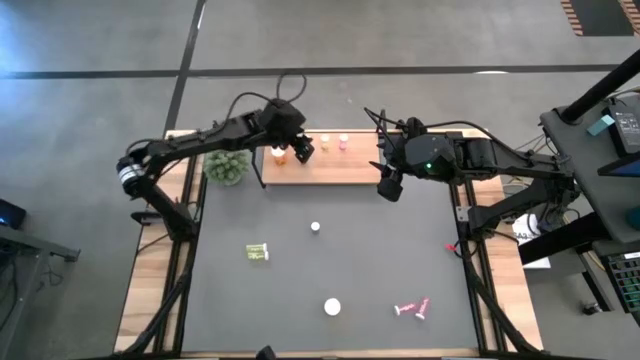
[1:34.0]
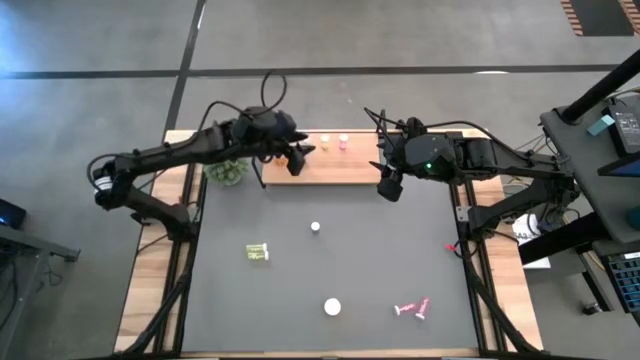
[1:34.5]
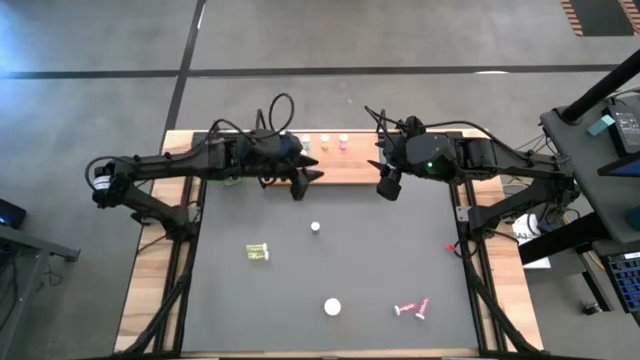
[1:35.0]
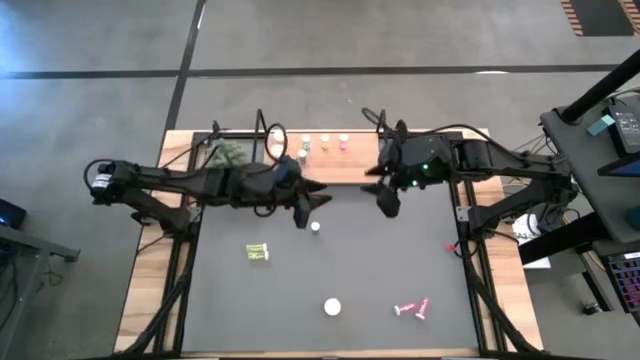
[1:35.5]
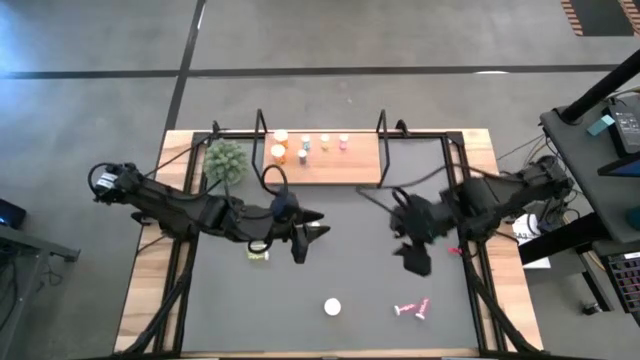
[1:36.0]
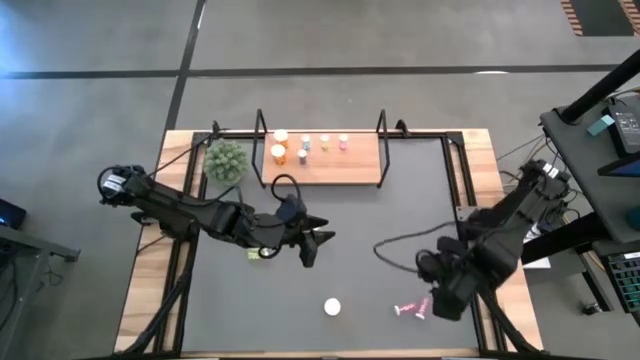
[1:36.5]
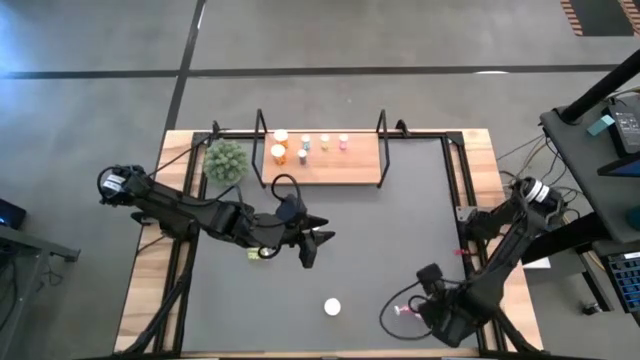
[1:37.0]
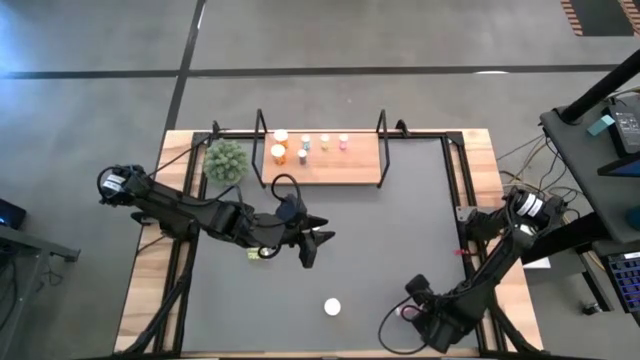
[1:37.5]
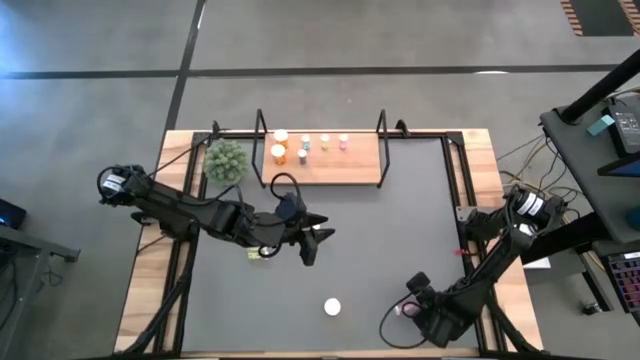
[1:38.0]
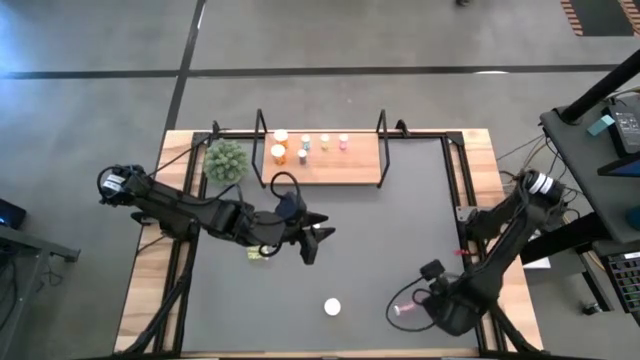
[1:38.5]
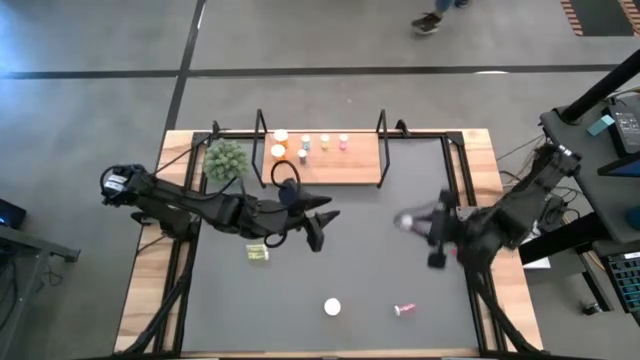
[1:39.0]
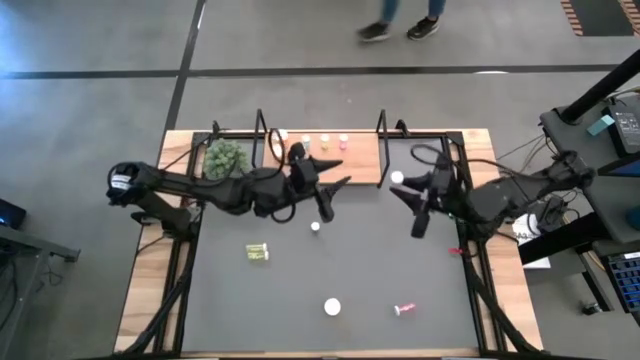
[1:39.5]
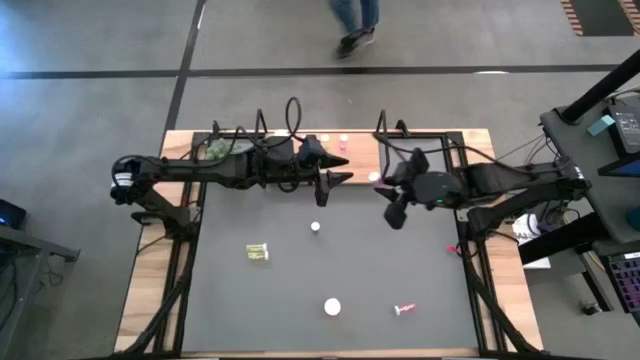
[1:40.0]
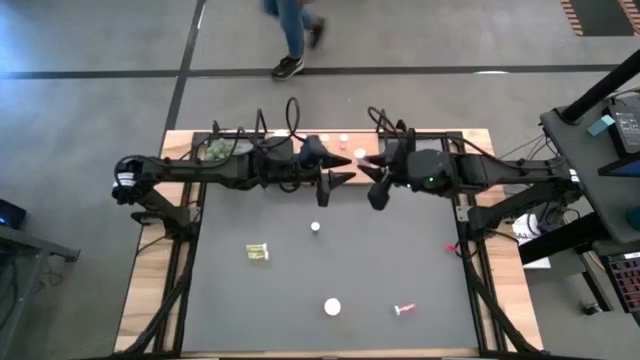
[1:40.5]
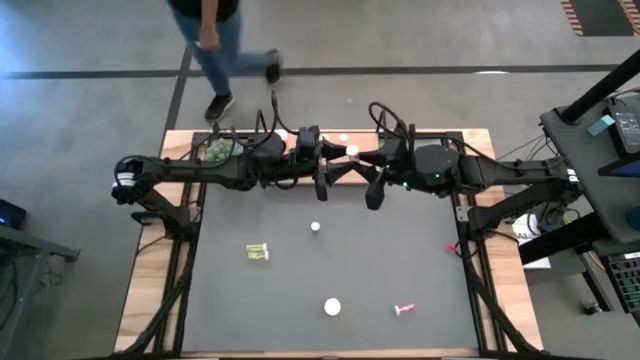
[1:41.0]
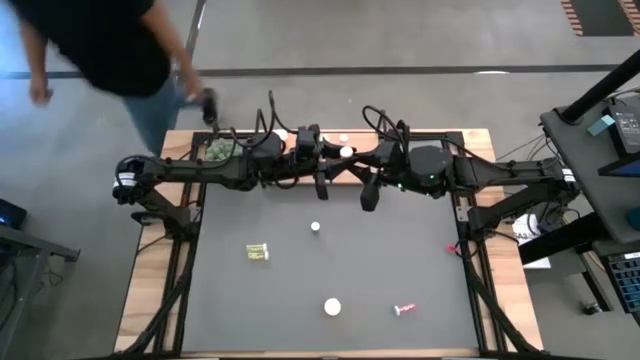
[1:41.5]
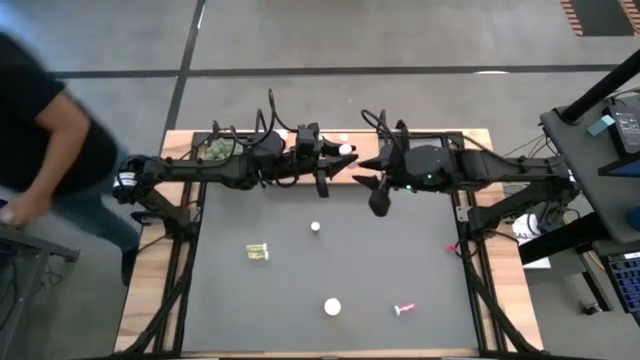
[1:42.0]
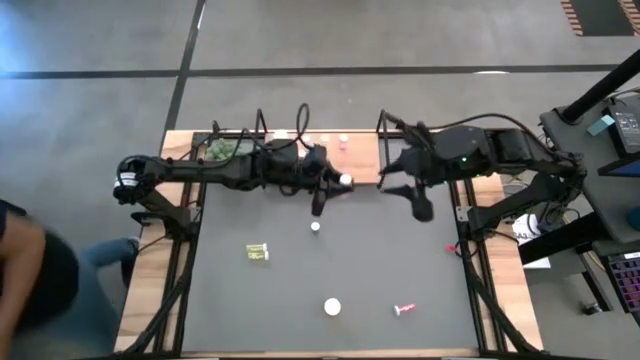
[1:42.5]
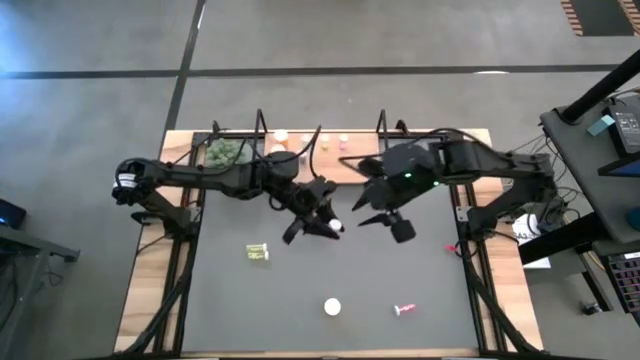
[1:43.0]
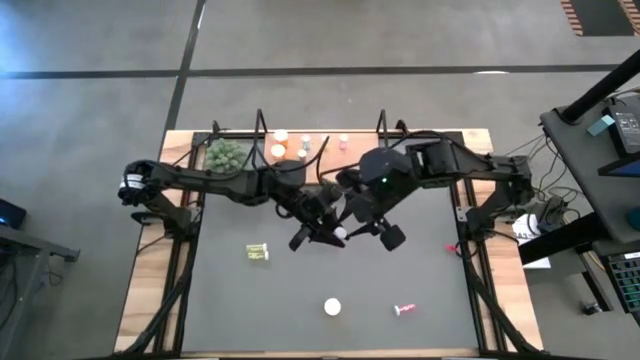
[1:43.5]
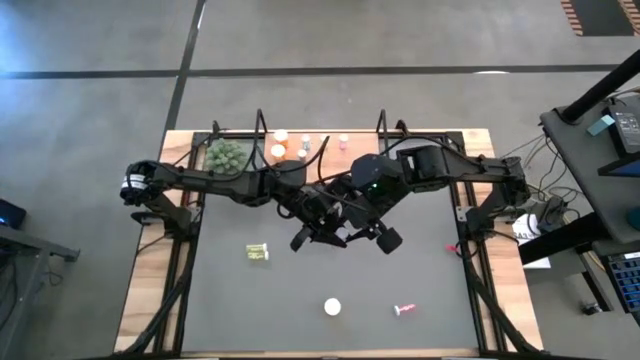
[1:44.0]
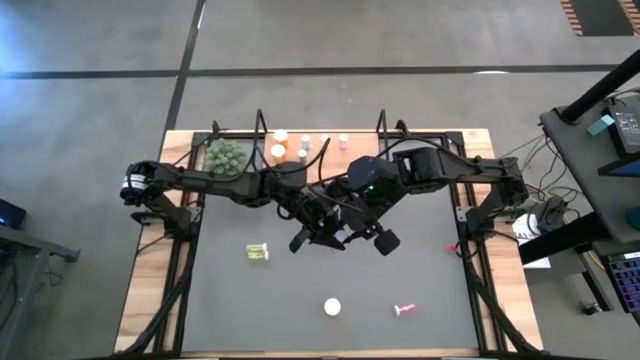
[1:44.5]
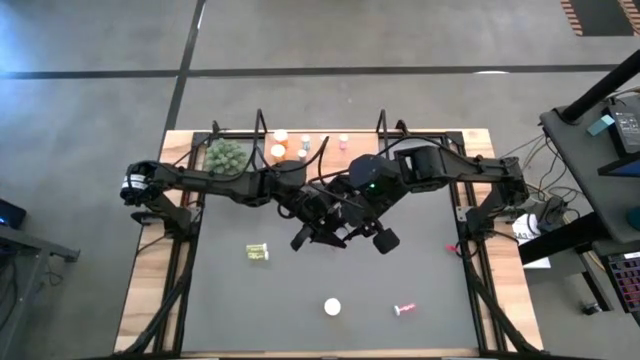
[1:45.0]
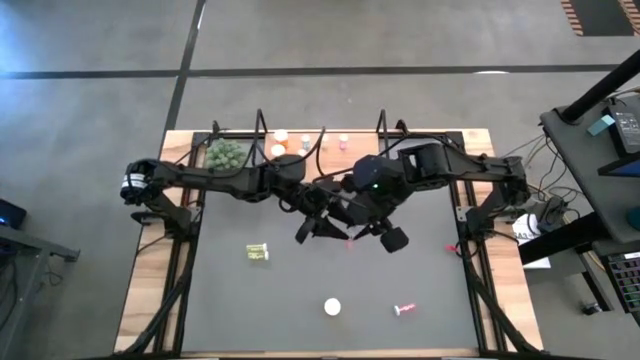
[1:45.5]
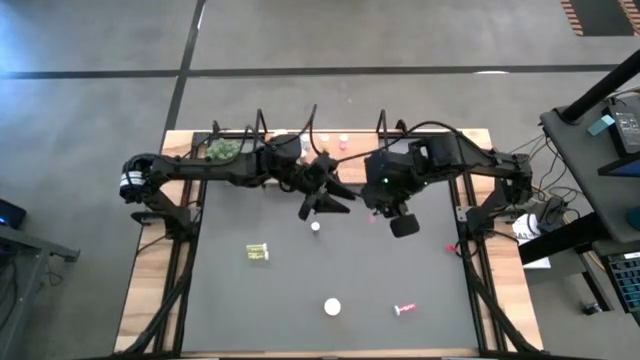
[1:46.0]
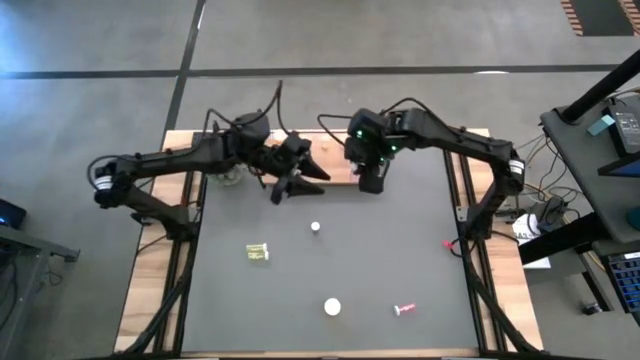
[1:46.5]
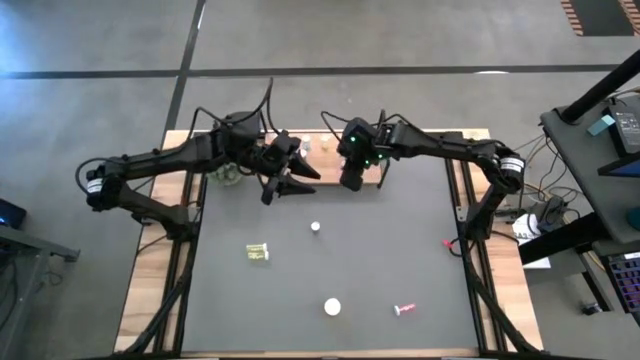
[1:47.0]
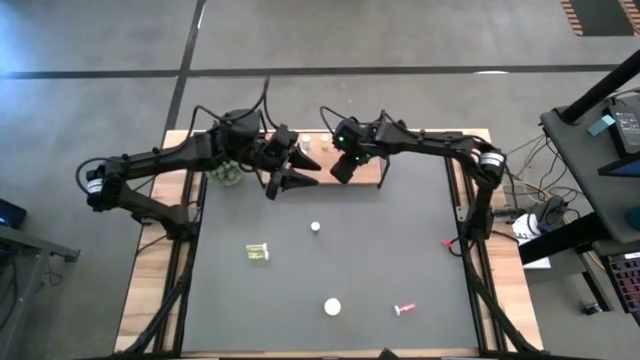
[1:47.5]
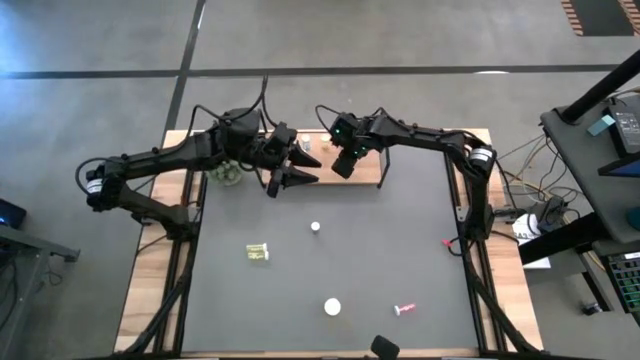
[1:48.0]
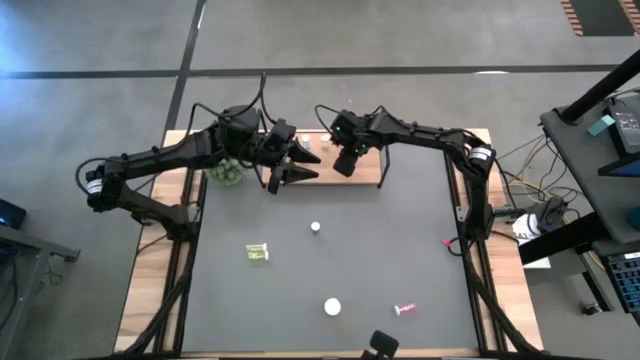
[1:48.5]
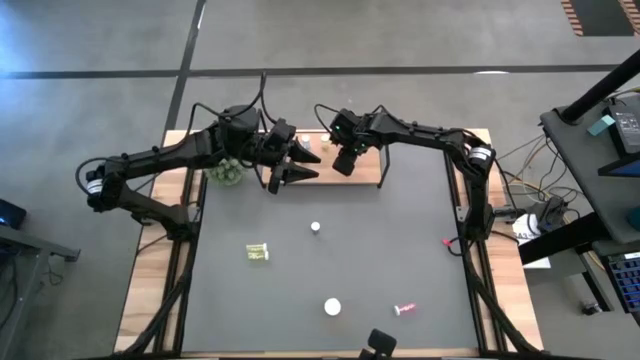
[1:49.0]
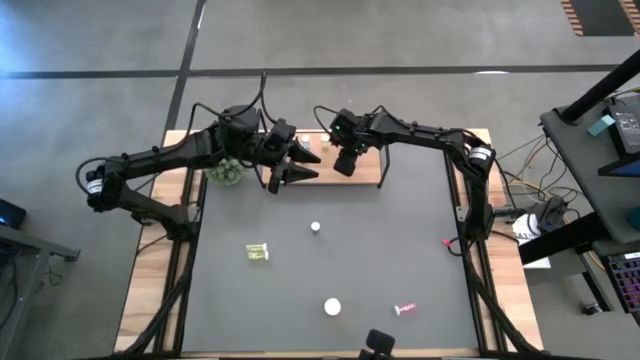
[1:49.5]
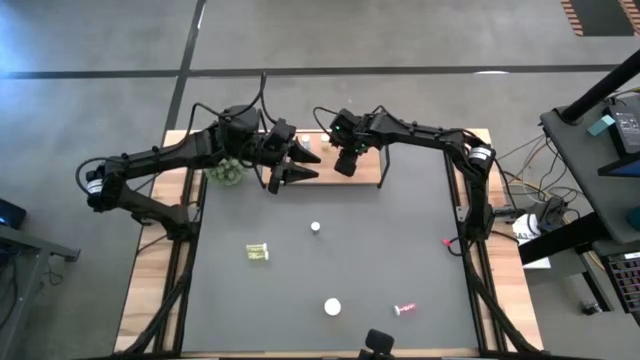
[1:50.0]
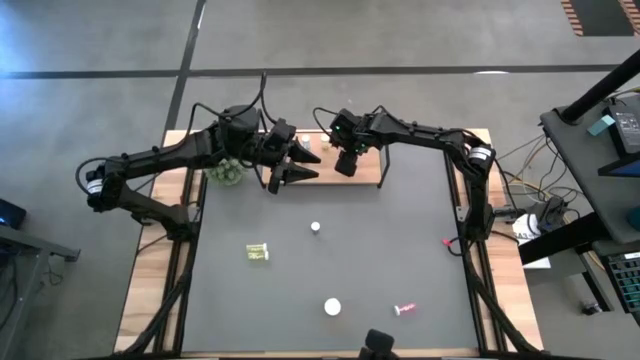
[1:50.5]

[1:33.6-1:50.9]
Task: Pick and place medicine bottles onto shelf by color
Put the bottom pink pill bottle on the shelf aligned with the other pink pill bottle

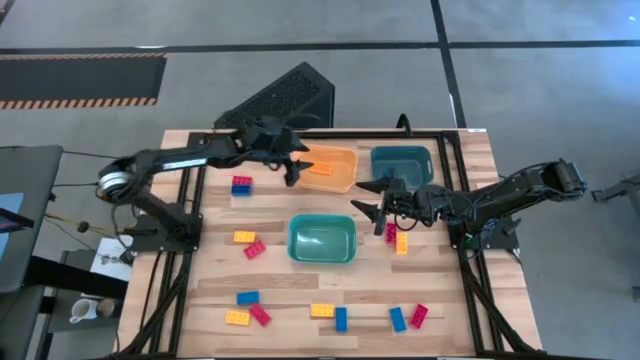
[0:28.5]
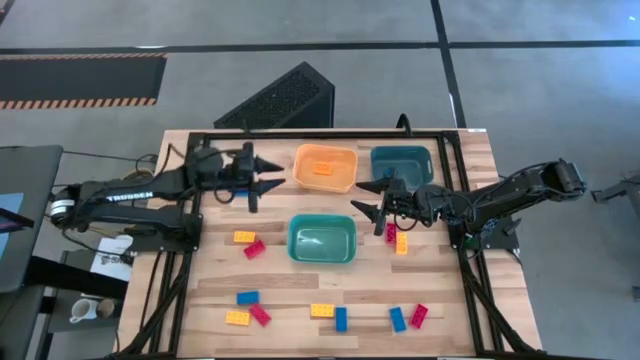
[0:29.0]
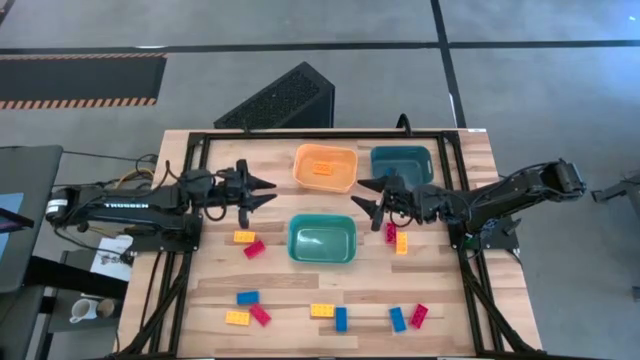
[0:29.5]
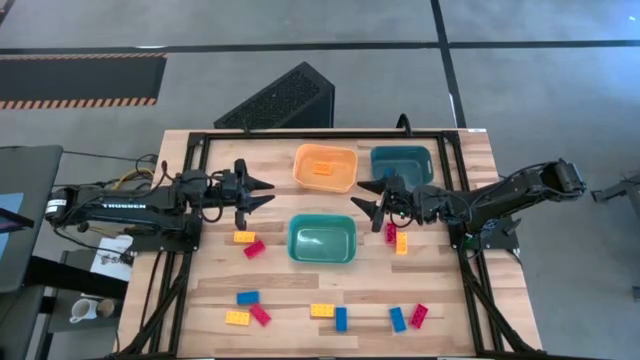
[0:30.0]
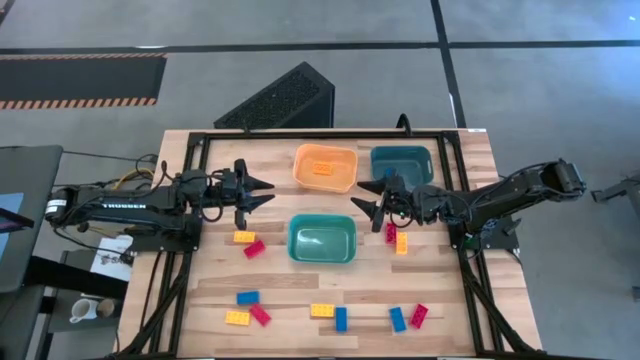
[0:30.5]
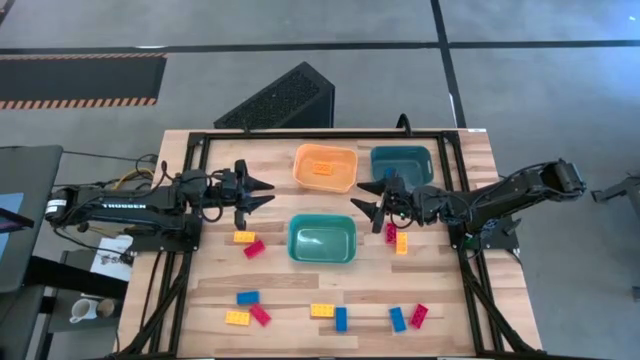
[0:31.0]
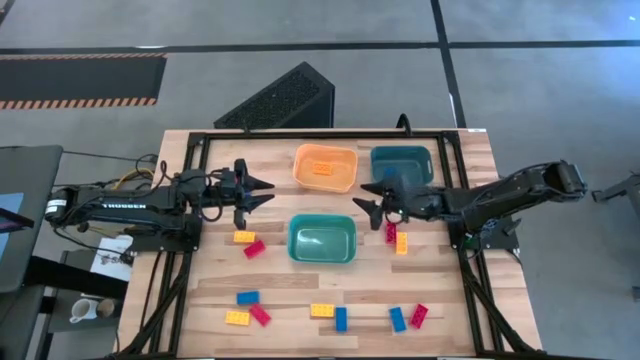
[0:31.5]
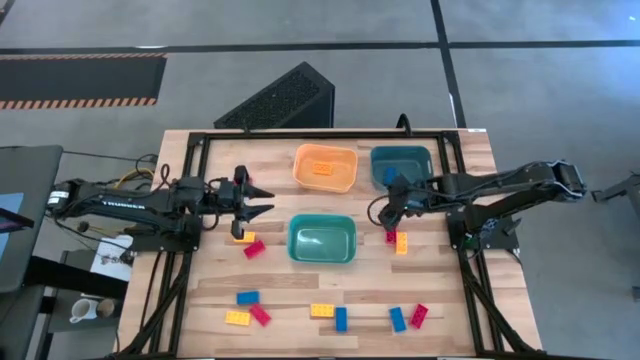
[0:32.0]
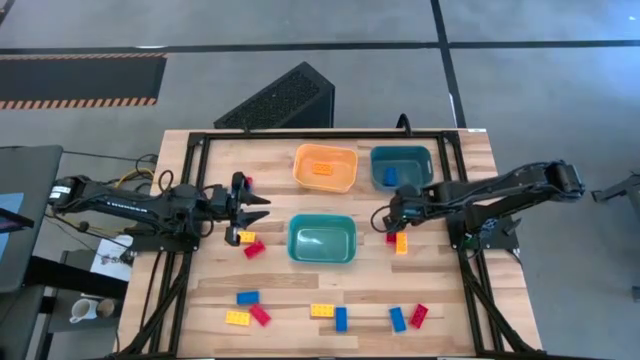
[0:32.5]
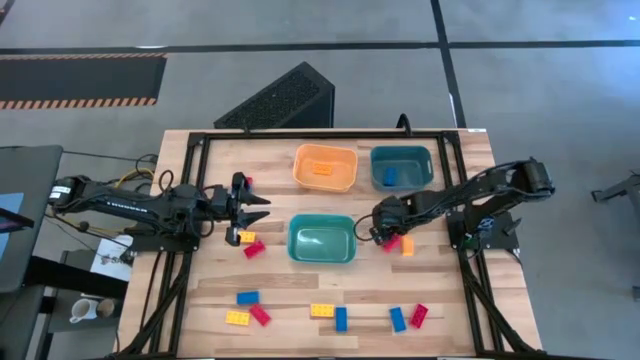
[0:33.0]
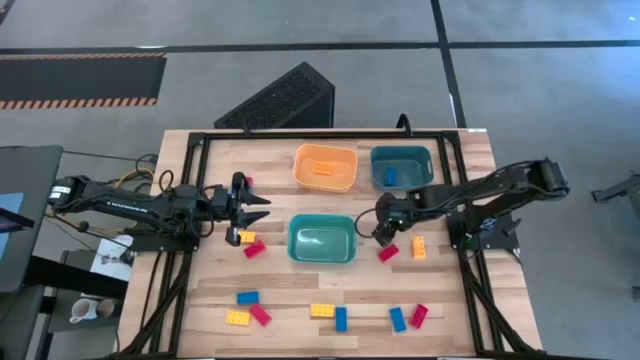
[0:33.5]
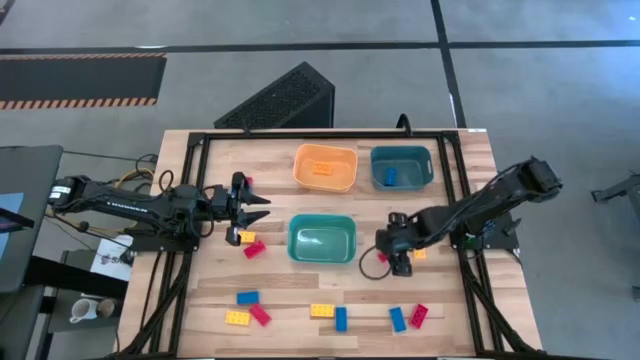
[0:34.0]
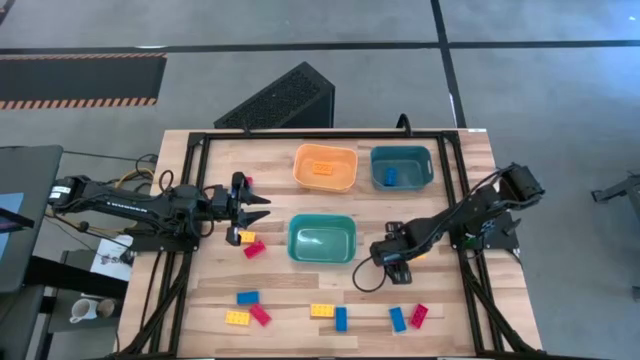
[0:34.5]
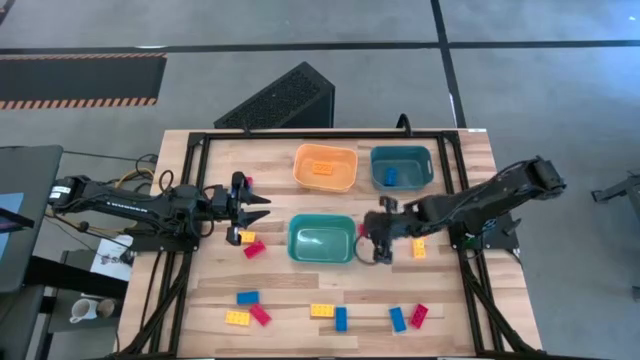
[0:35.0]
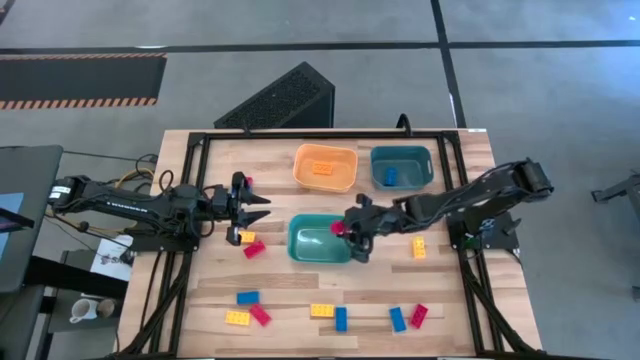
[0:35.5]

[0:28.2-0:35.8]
Task: Sort & place blocks by color
Put the red game piece into the green bin
